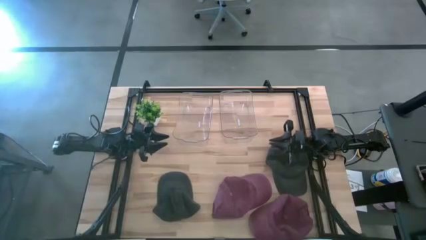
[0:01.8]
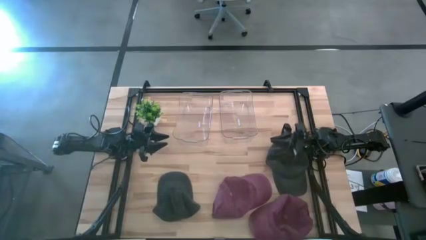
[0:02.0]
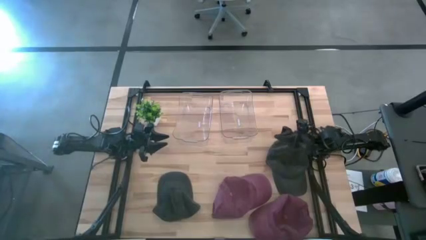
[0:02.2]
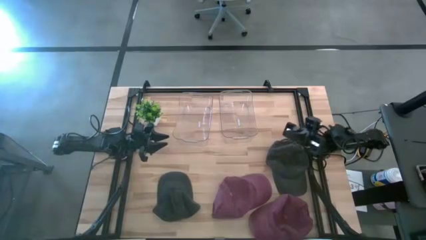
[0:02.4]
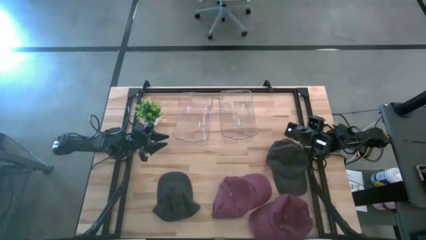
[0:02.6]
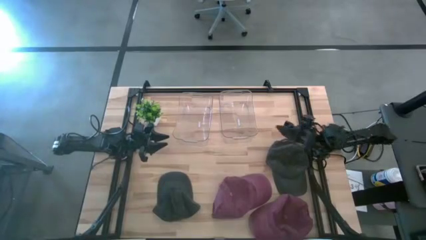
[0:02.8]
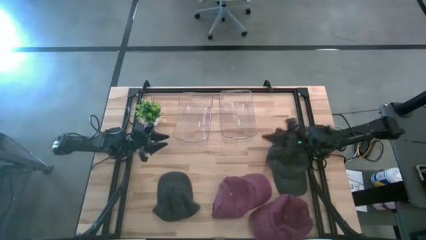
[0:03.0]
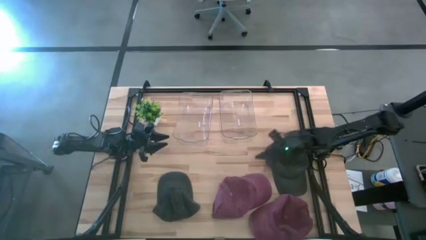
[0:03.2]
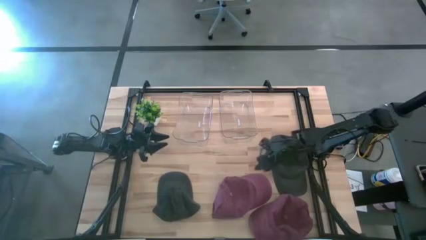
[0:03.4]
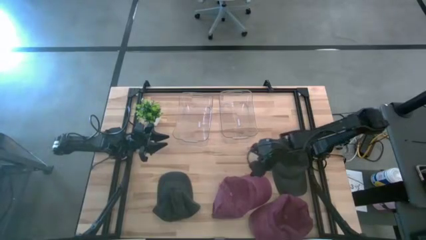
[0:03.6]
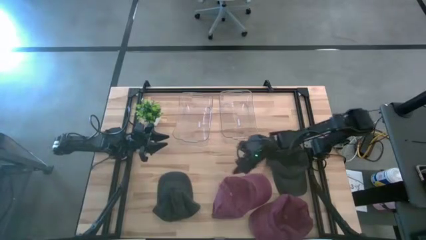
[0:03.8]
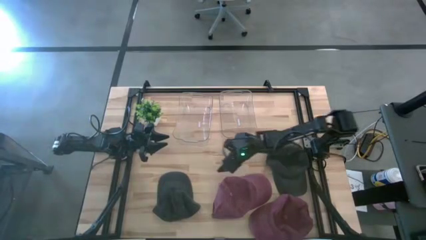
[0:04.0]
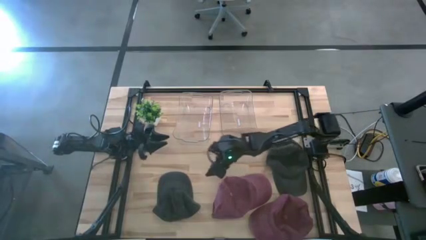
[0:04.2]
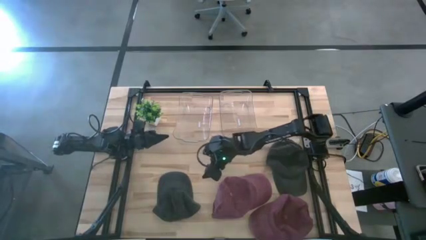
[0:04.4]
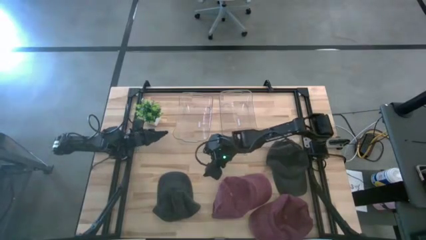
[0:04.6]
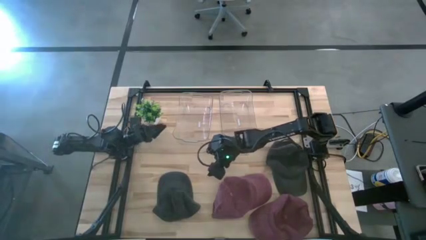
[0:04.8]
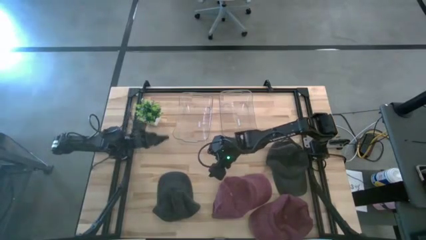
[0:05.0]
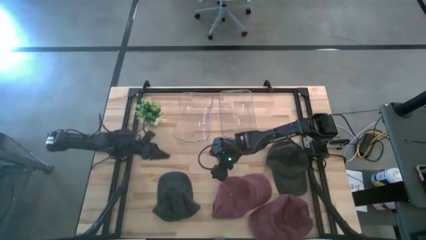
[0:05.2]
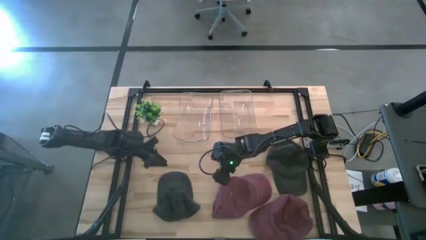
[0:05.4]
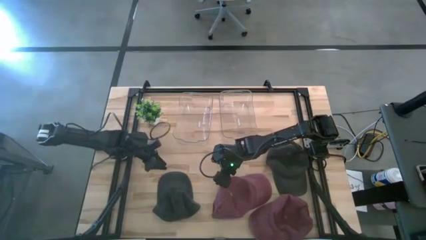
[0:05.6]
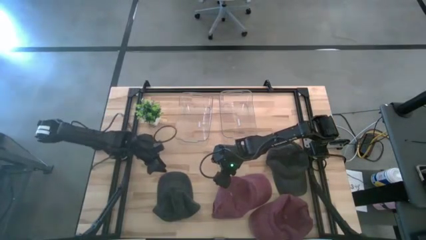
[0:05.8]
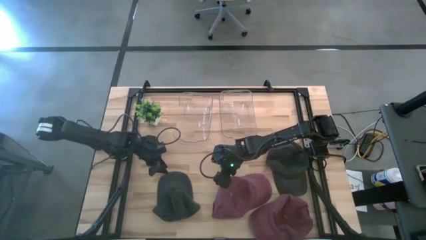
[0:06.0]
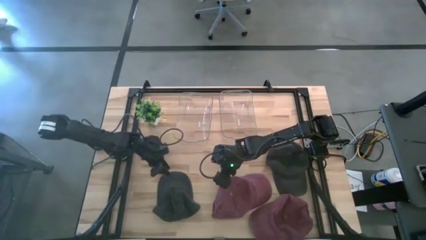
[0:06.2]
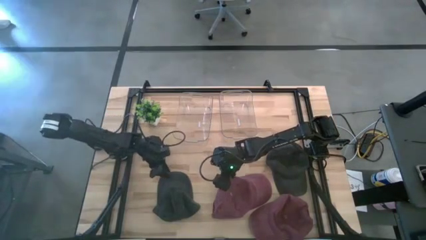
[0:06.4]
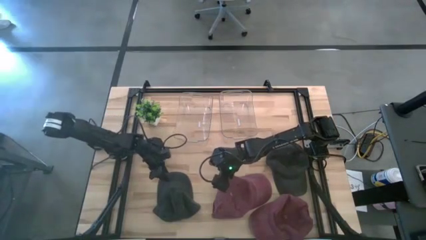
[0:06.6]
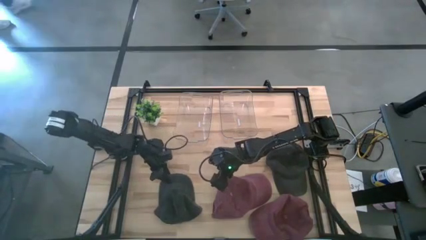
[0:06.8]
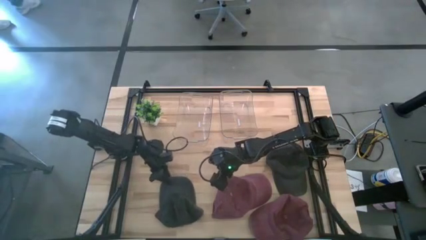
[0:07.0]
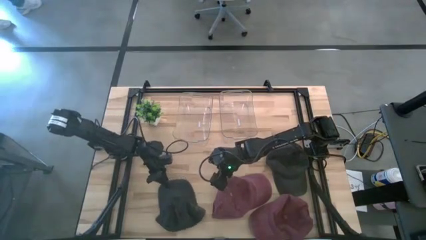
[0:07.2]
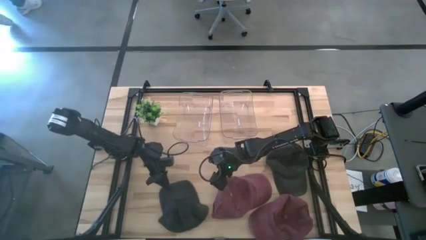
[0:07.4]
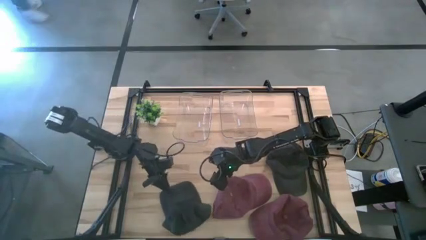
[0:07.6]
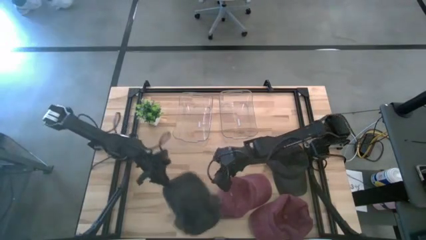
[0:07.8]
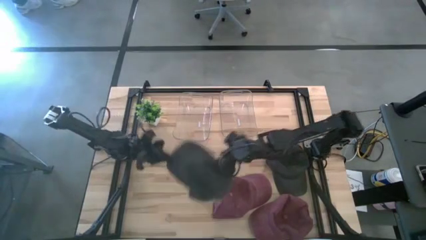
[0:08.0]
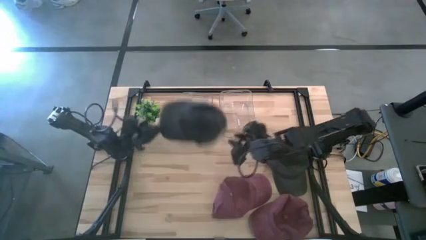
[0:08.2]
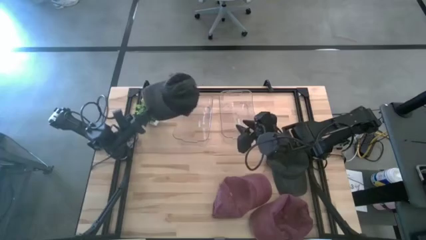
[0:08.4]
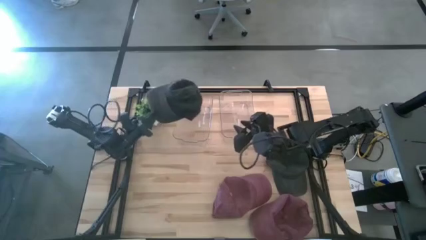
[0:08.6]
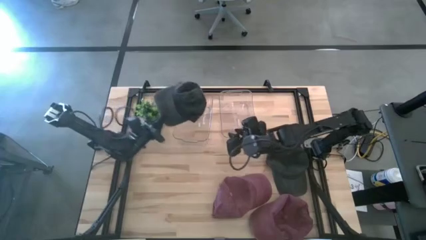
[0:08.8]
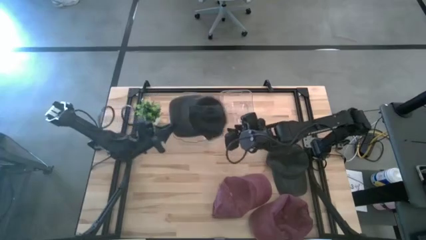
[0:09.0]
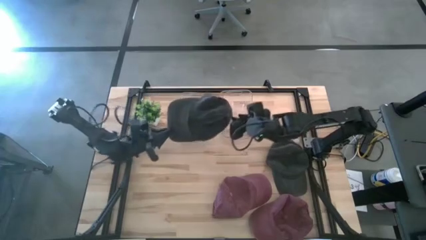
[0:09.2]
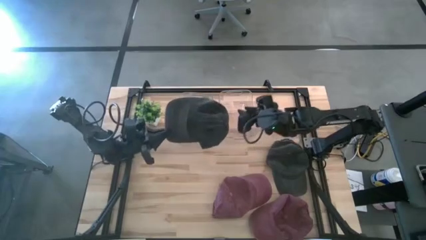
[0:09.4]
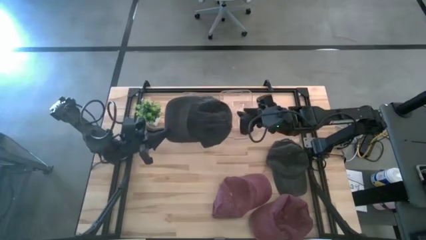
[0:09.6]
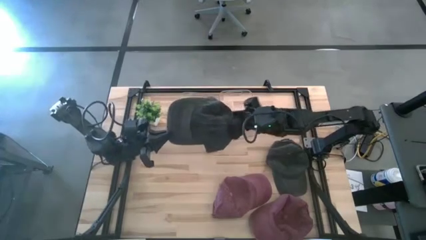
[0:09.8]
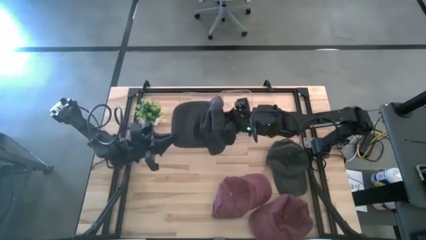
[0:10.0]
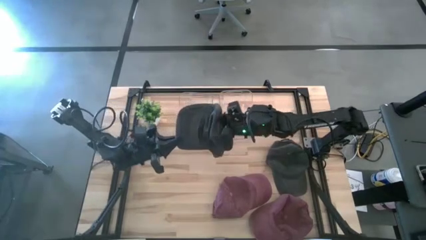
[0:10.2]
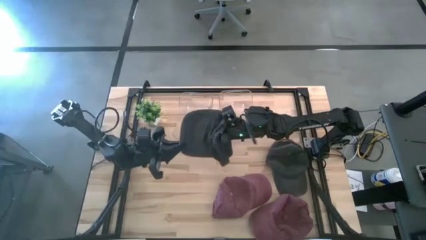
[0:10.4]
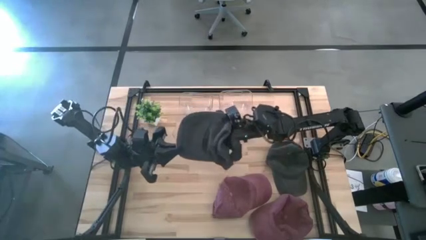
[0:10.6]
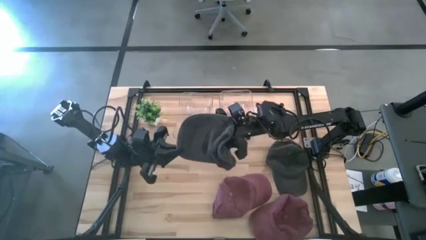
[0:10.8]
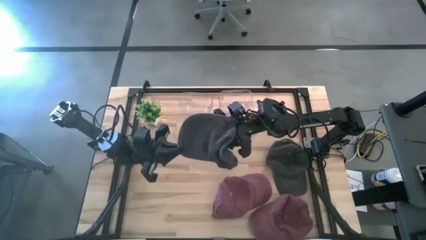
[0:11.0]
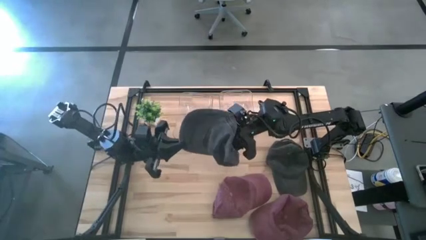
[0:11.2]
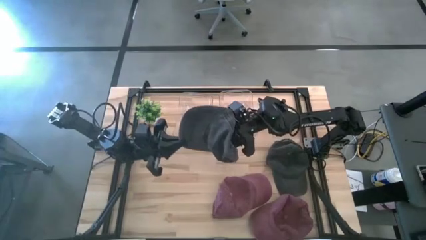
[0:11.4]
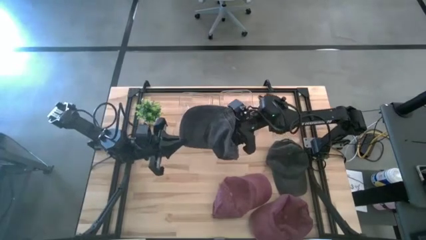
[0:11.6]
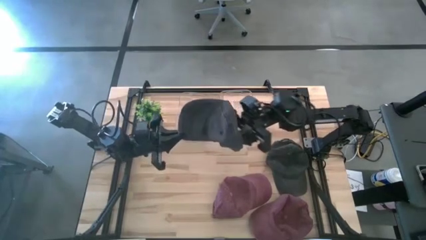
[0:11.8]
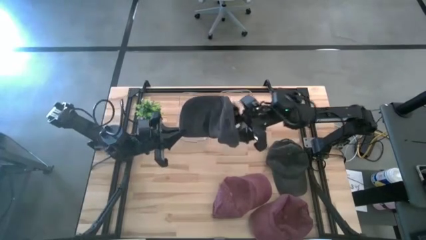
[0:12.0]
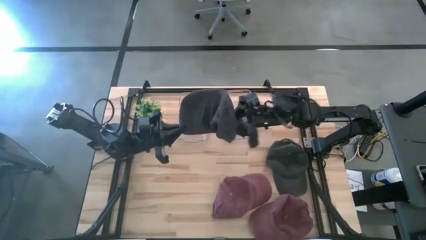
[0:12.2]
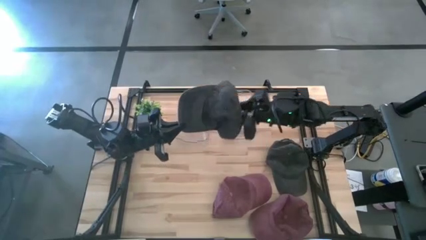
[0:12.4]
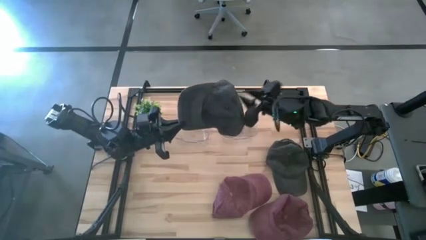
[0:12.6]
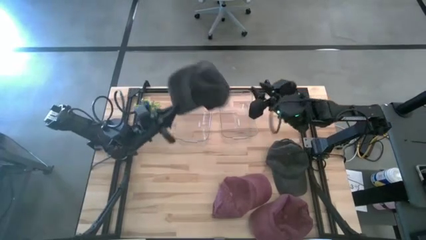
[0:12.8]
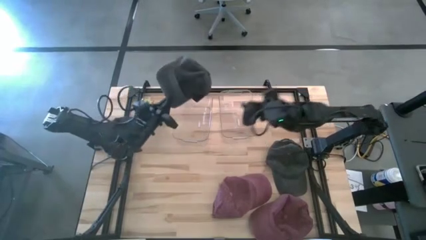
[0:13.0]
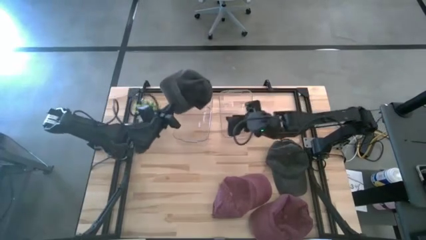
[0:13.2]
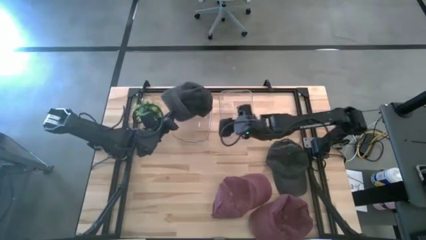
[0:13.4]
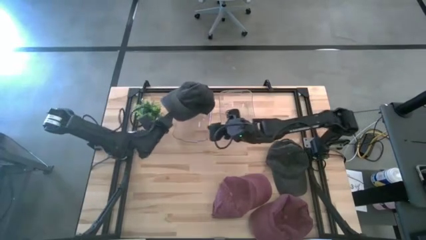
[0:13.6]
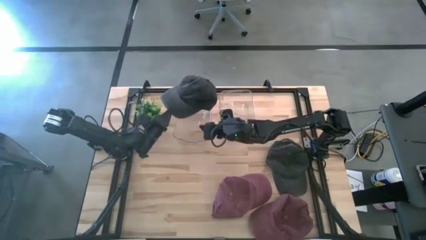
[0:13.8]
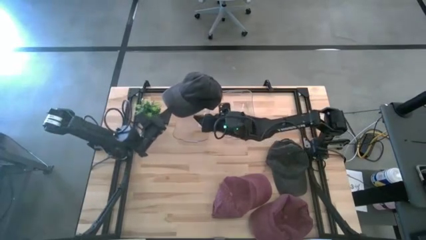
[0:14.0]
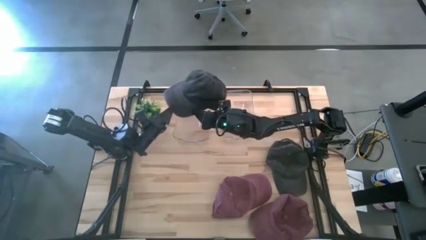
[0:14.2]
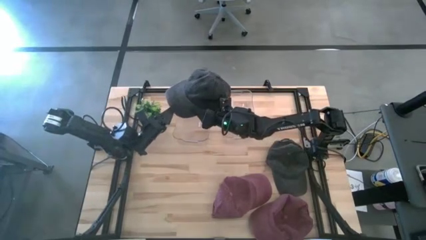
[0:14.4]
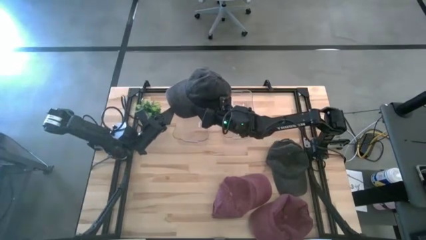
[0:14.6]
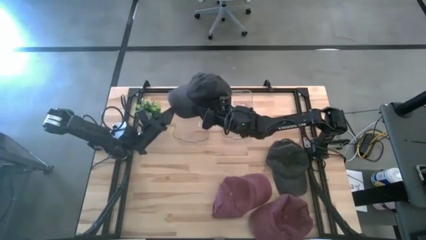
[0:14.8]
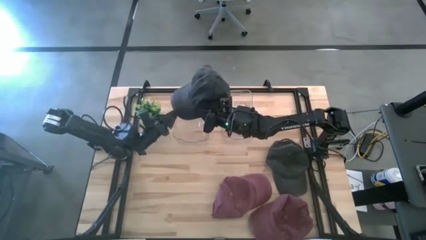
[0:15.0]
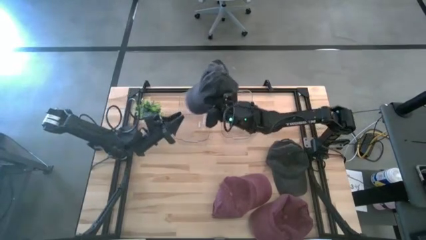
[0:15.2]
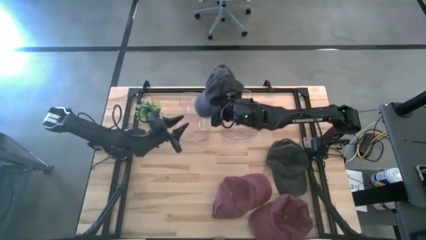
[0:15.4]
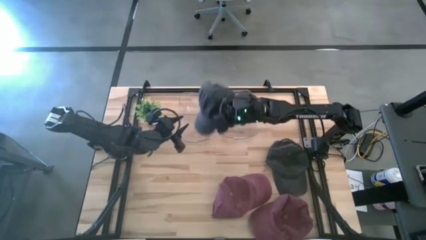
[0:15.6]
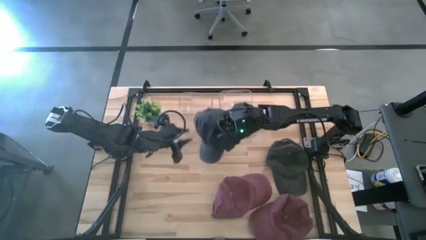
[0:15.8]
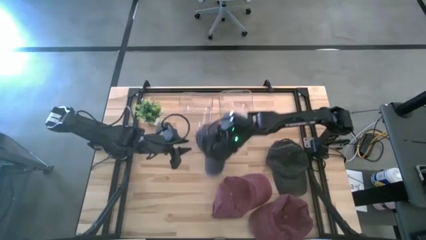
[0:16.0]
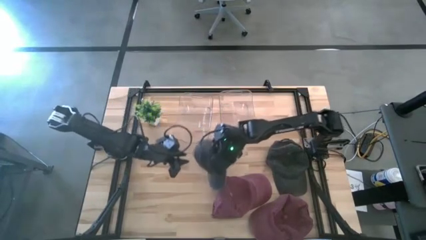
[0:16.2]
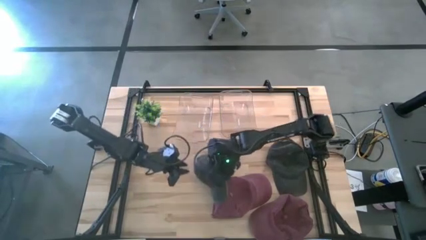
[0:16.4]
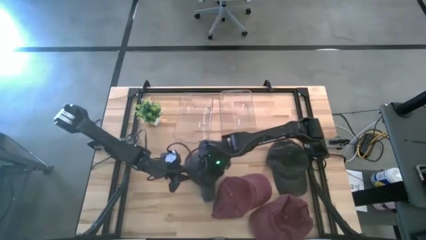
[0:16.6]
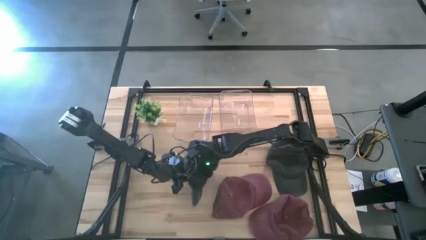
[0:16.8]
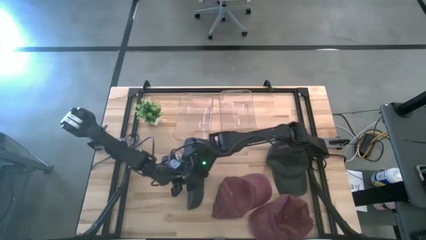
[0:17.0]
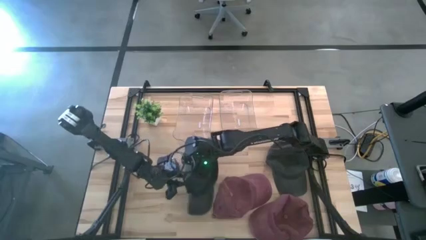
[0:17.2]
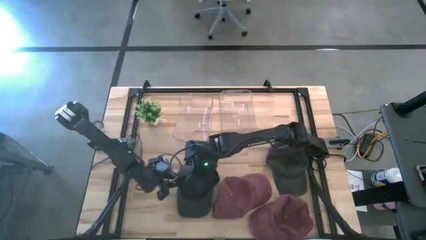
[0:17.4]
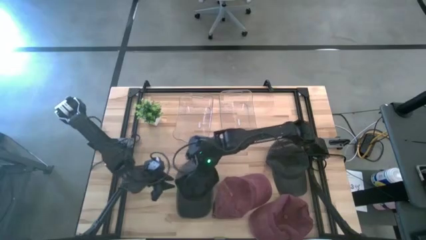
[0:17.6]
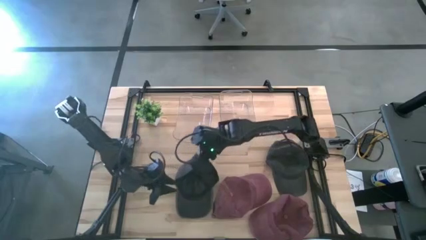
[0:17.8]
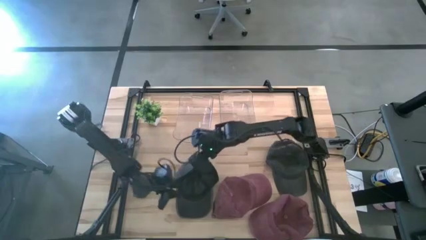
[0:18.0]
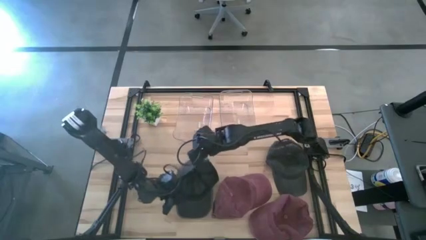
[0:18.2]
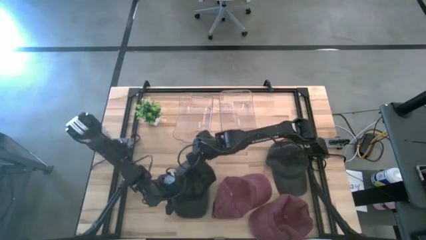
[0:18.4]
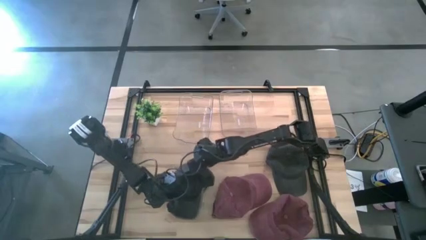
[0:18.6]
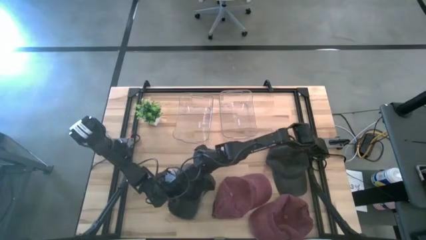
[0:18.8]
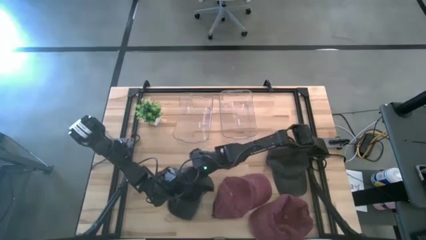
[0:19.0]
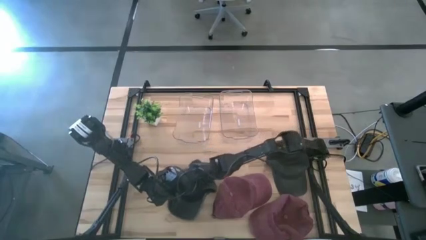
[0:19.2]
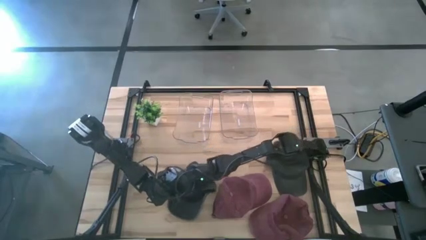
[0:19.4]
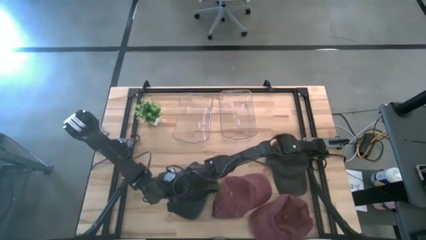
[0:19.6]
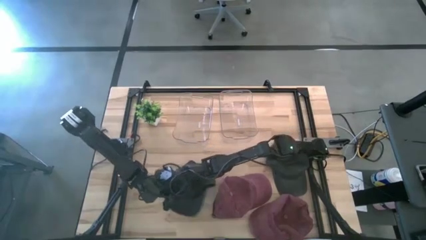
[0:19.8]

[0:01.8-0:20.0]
Task: Pick & Place hat
Put the black cap into the left transparent bin
